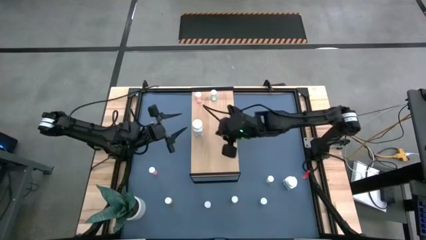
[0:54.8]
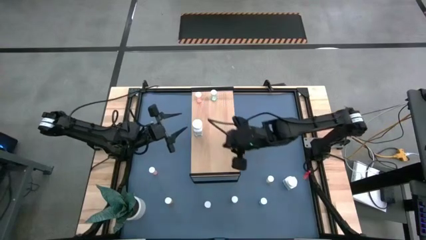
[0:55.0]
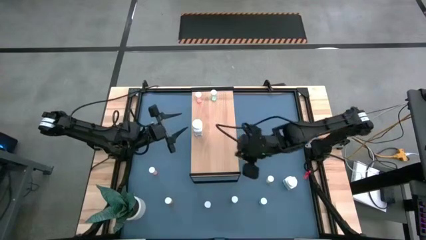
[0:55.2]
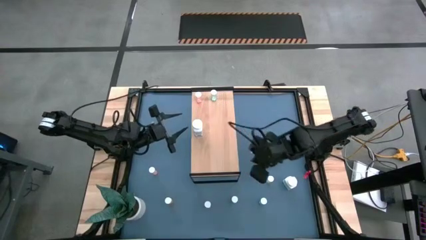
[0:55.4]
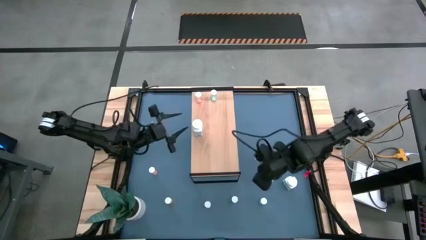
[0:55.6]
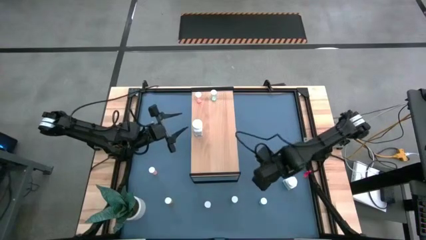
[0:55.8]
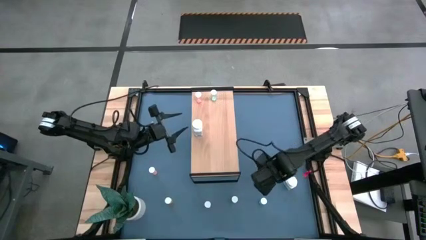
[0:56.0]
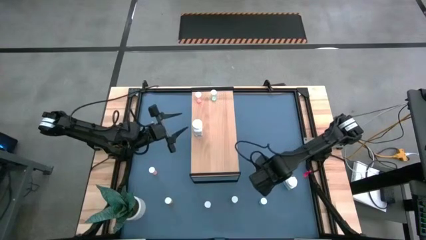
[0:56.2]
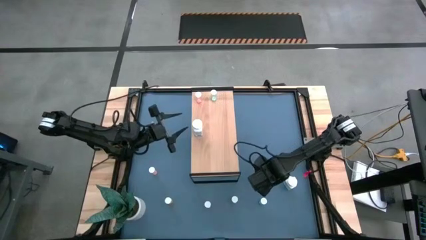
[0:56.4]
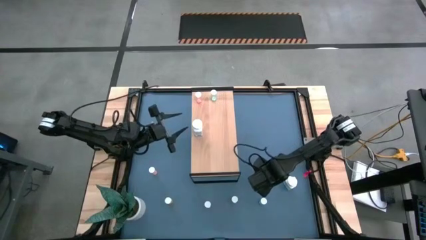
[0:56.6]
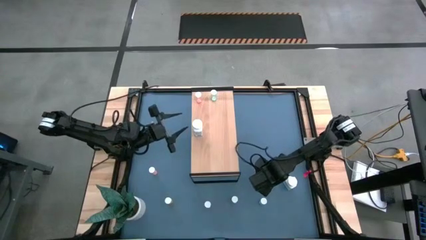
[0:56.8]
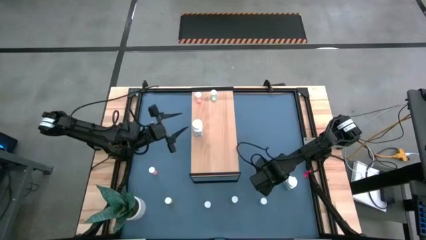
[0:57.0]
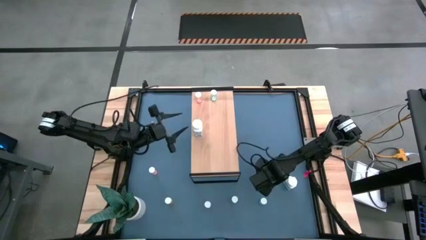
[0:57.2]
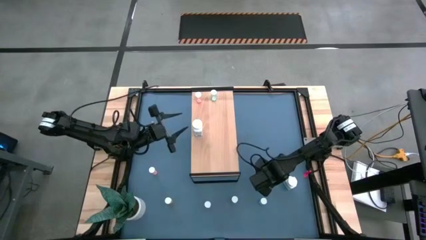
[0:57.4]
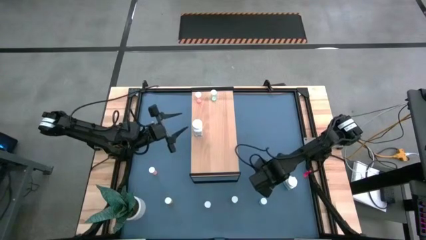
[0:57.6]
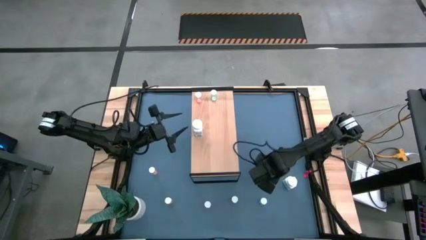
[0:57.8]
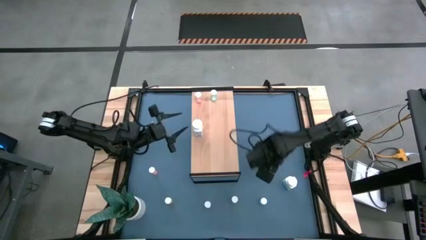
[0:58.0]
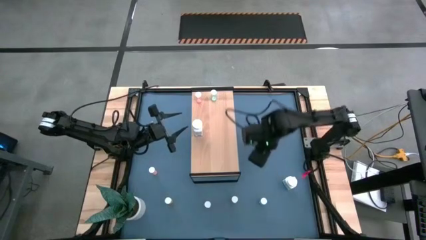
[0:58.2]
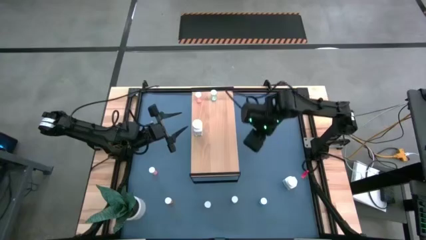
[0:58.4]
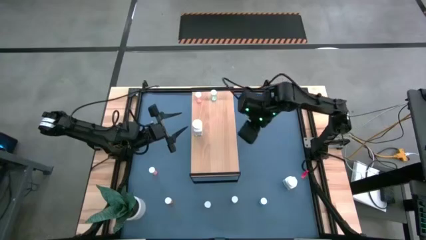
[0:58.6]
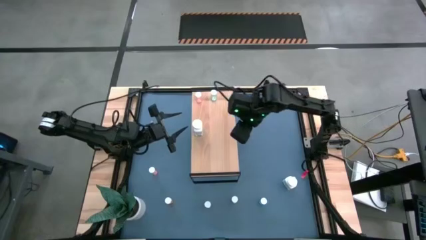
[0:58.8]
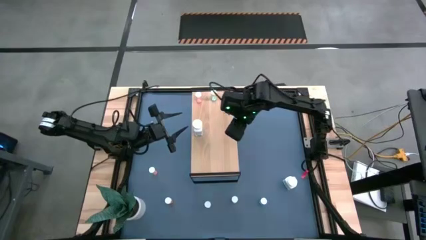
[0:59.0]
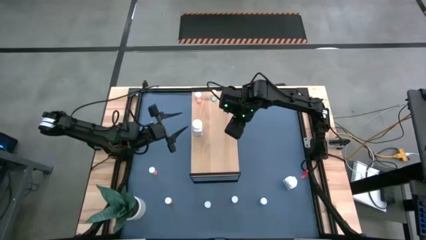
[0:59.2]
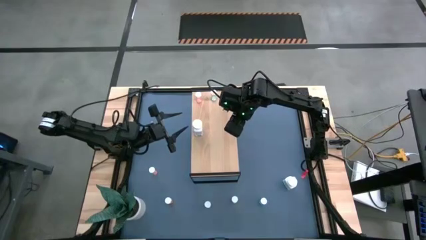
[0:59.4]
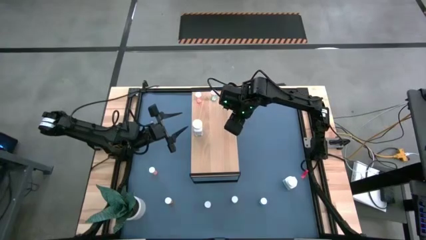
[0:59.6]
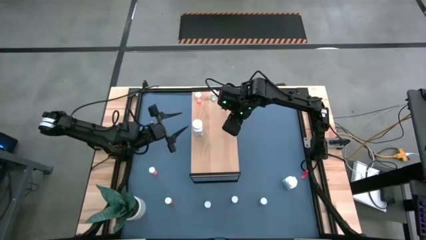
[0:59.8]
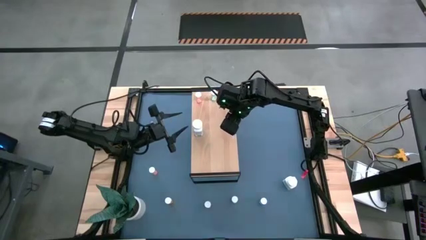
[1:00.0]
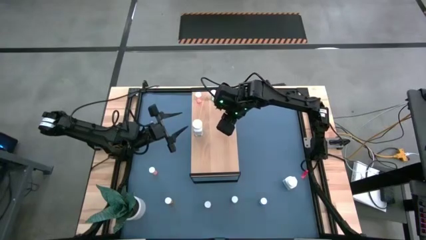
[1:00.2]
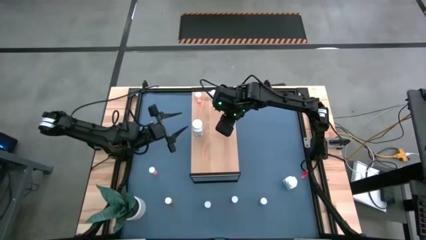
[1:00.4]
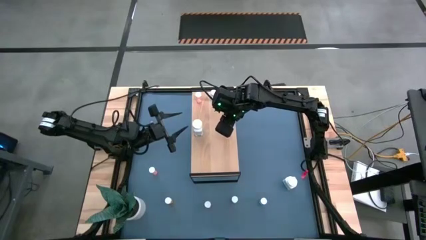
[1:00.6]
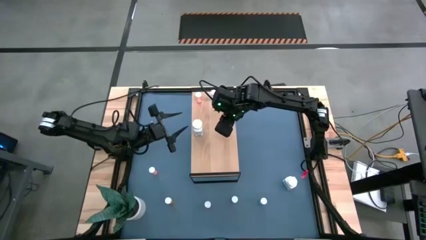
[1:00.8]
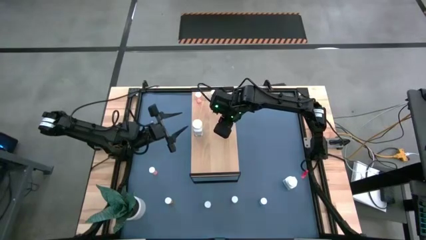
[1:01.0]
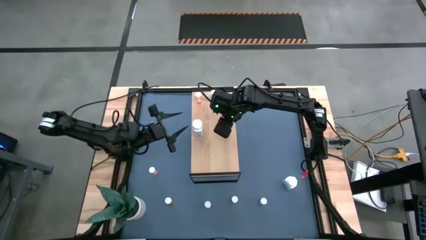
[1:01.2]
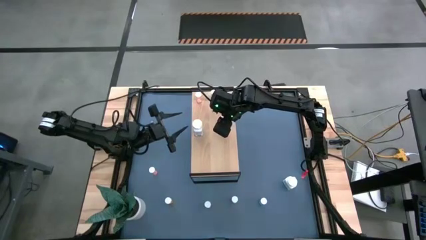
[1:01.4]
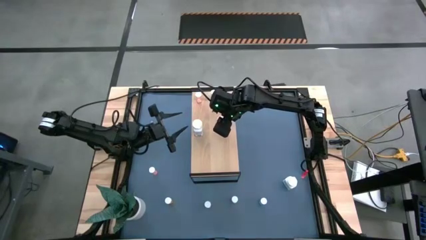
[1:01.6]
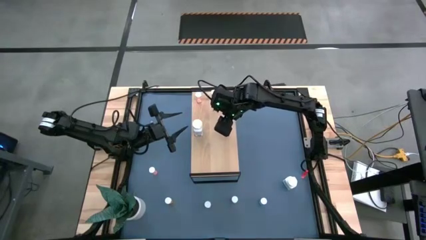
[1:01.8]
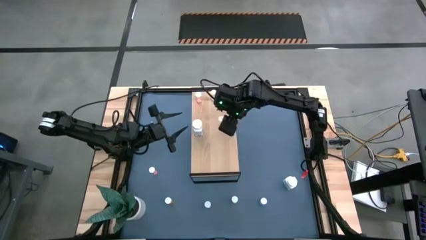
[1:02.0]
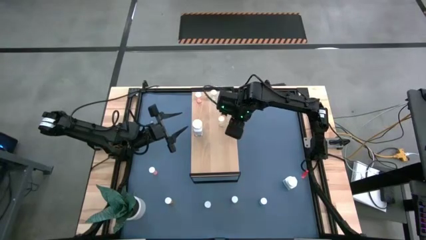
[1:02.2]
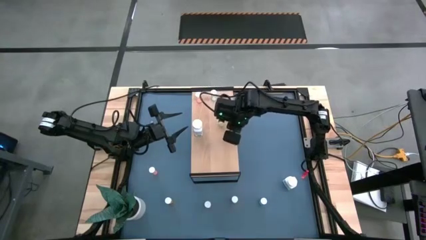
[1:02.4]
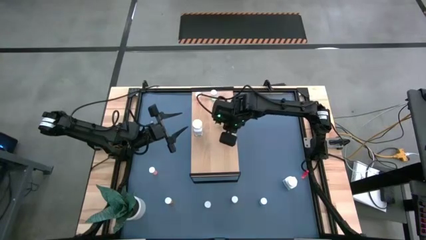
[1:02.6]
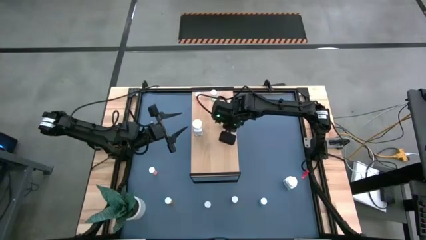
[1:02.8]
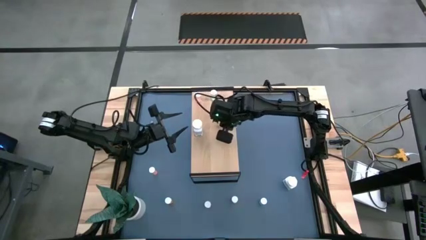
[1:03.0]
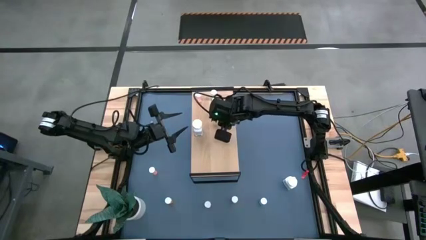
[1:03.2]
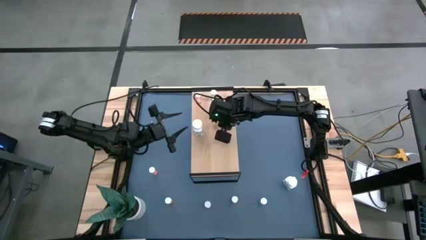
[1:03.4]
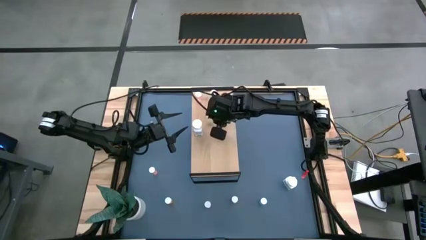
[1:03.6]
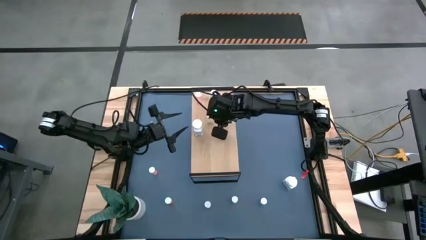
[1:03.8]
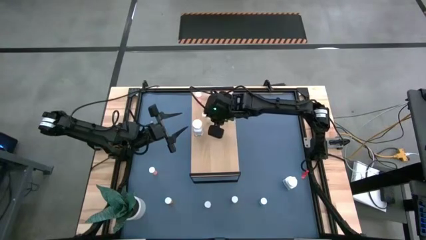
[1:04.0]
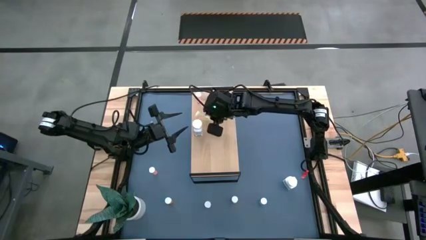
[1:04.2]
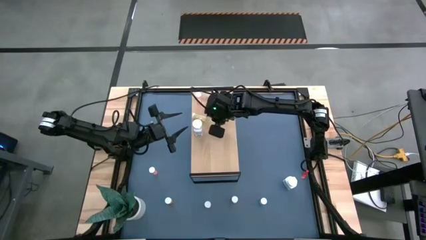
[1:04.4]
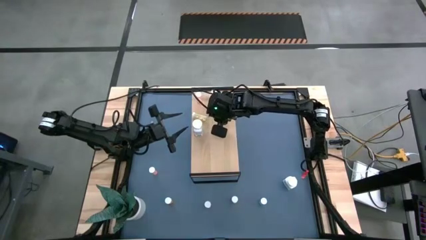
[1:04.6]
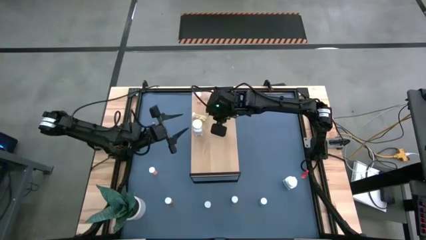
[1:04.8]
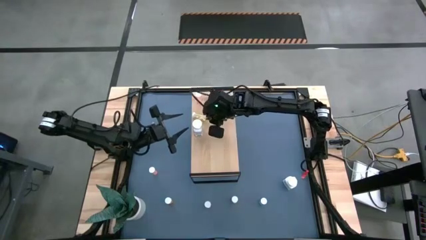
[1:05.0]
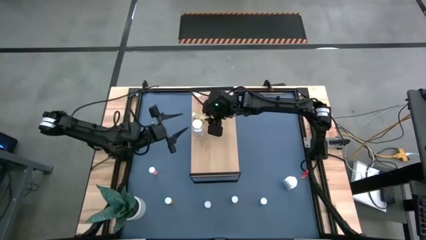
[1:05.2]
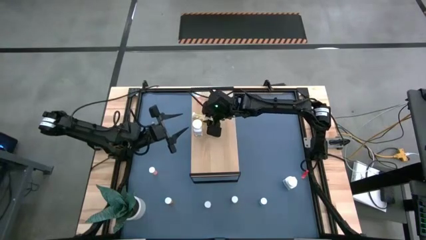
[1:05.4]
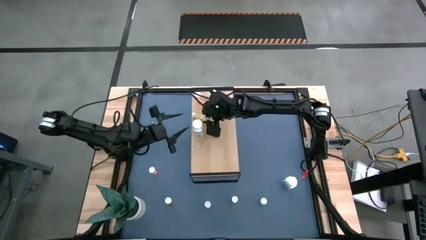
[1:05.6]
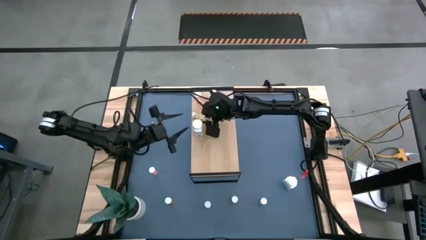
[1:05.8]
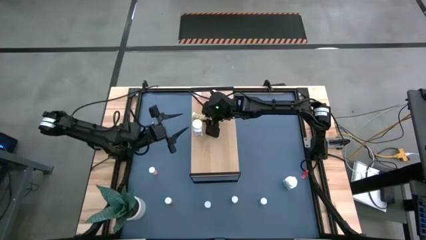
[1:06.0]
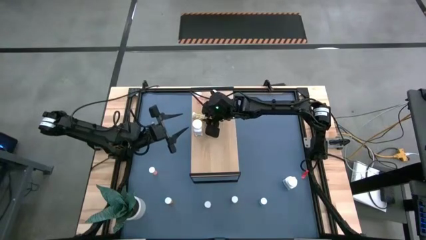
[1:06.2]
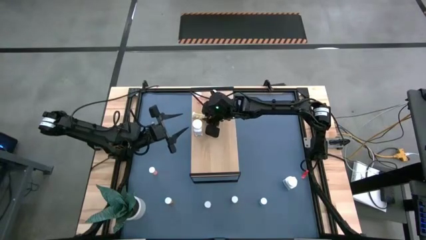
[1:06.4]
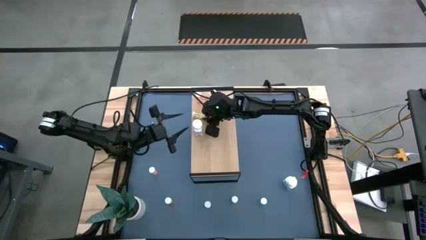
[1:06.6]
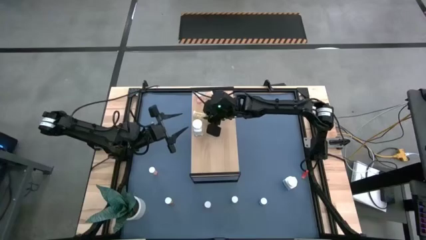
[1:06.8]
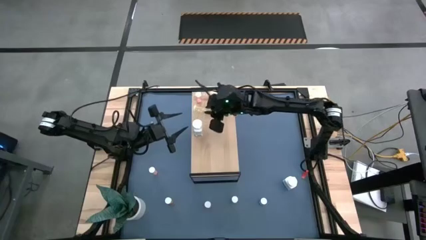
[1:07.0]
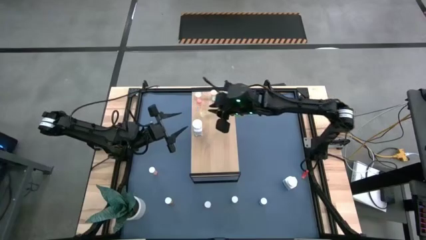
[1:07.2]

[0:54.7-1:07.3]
Task: Pick and place medicine bottles onto shelf by color
Put the yellow pill bottle on the shelf

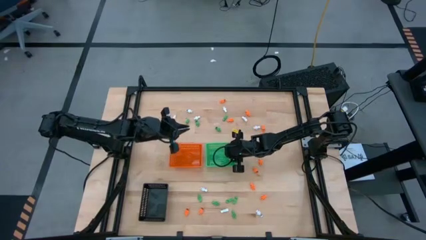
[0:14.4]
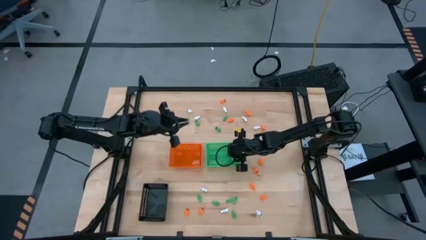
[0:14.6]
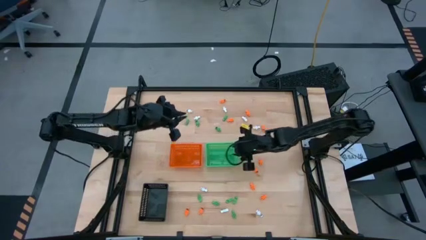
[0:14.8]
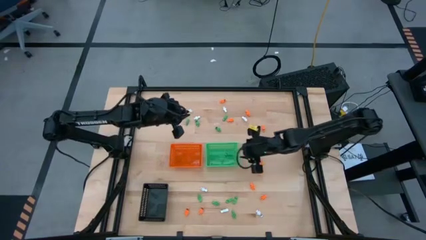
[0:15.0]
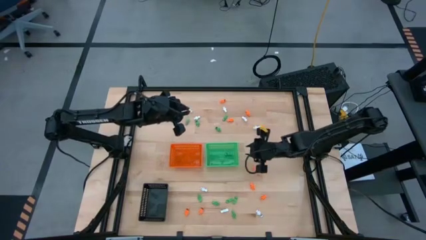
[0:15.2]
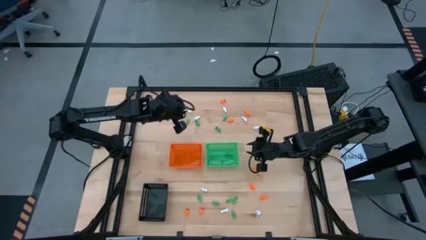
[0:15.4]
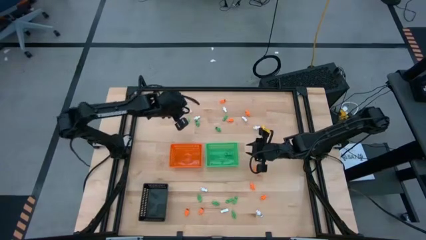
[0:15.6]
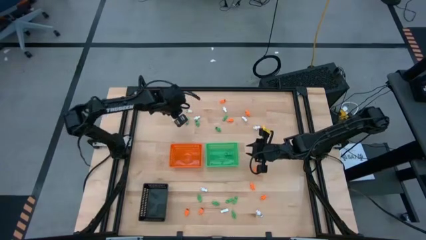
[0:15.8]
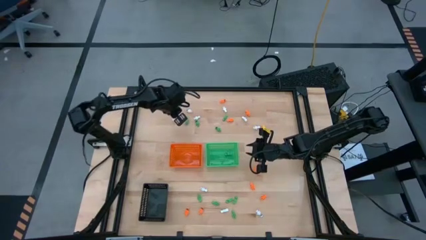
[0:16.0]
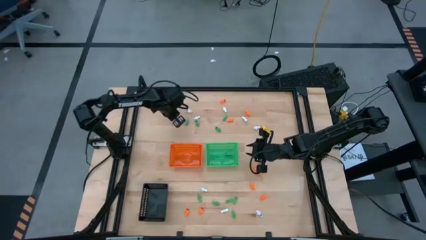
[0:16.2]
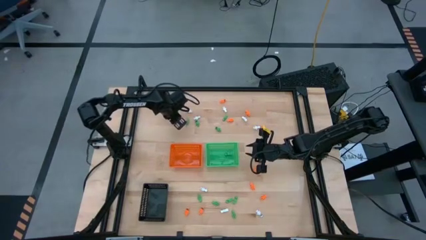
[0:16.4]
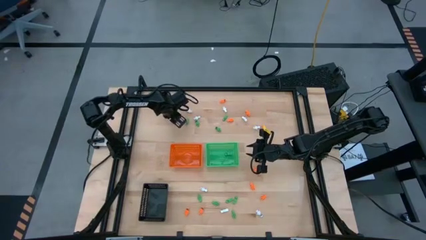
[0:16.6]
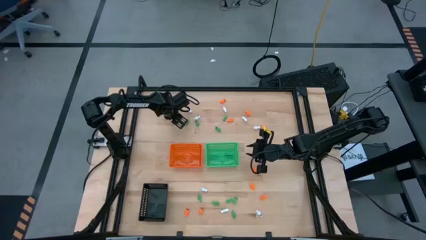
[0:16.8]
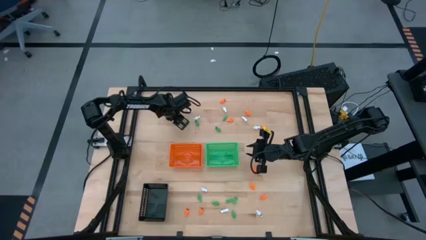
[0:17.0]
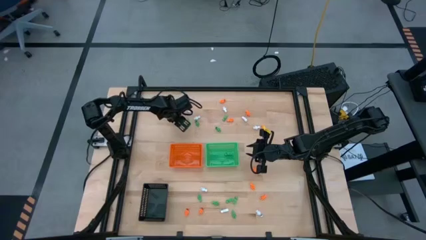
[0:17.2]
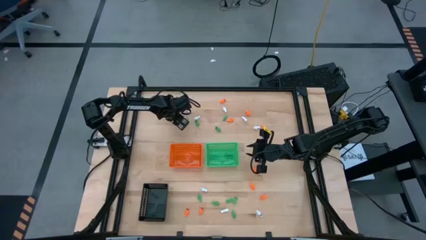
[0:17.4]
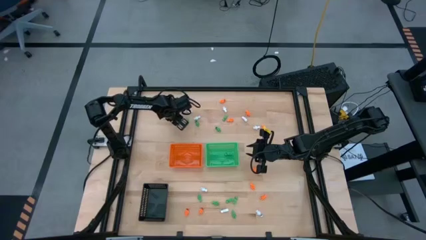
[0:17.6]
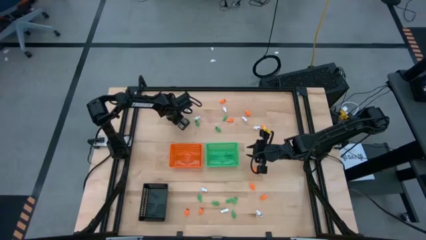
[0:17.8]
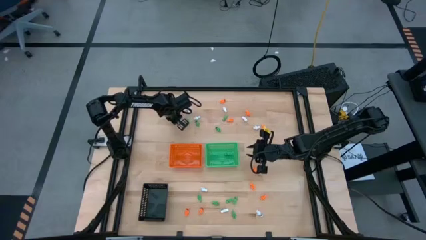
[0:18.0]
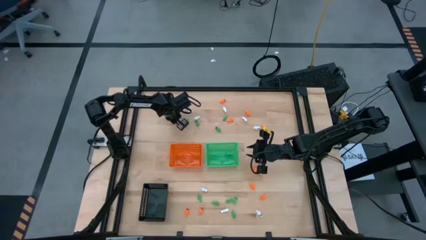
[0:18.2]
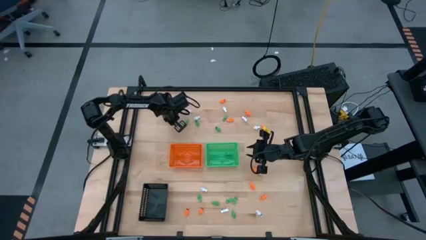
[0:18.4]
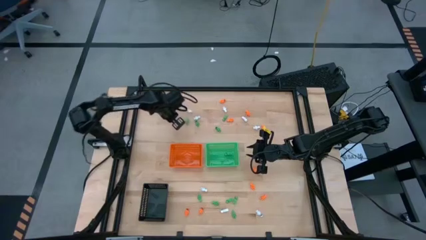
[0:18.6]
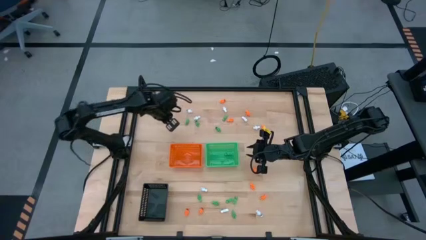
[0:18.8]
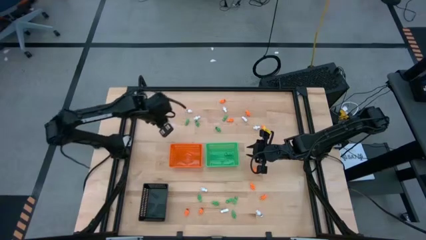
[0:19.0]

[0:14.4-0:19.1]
Task: Sort Halloween decoration
Put the white skeleton toy into the black bin
